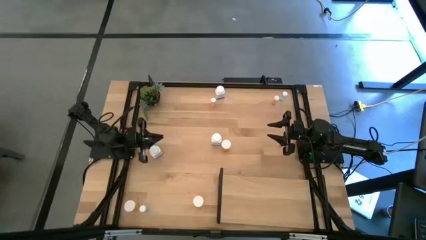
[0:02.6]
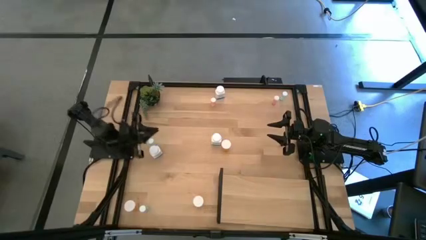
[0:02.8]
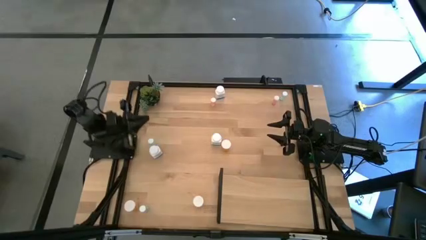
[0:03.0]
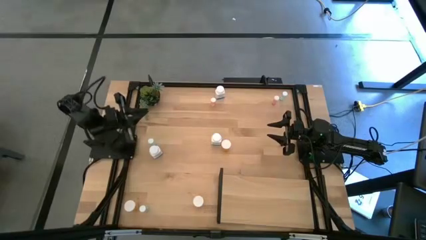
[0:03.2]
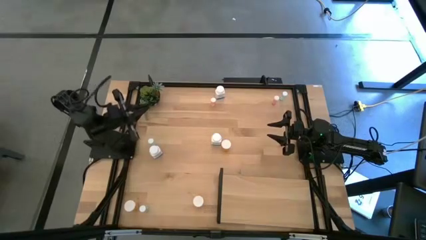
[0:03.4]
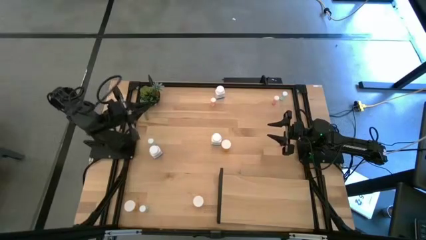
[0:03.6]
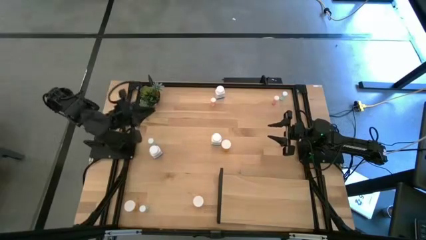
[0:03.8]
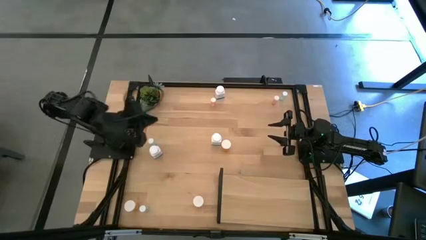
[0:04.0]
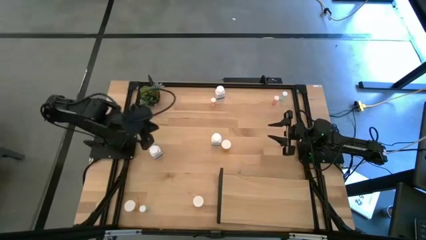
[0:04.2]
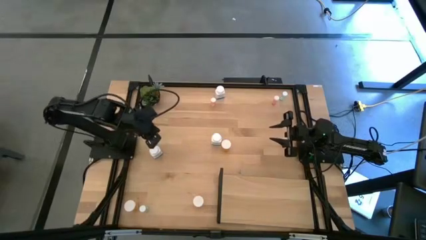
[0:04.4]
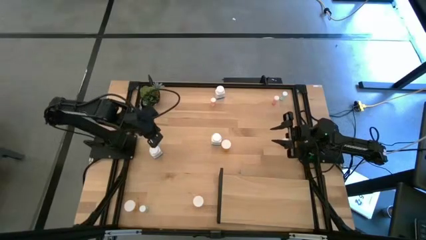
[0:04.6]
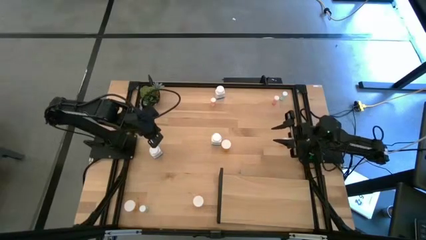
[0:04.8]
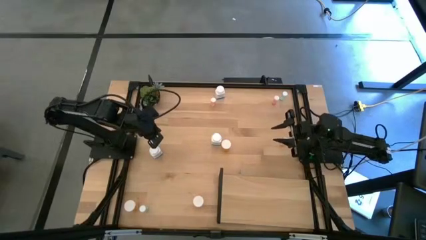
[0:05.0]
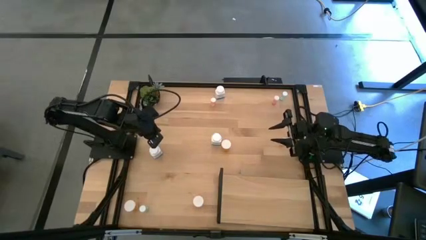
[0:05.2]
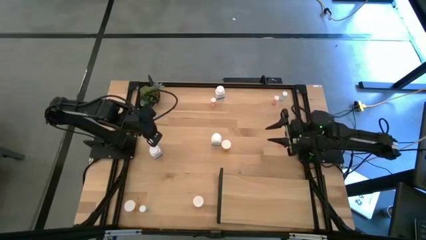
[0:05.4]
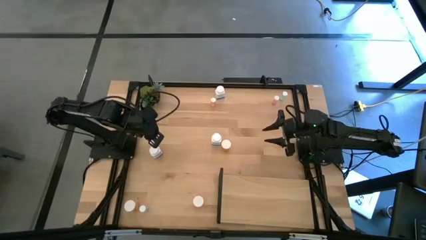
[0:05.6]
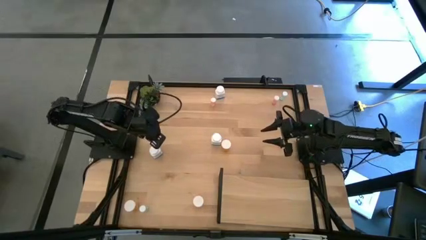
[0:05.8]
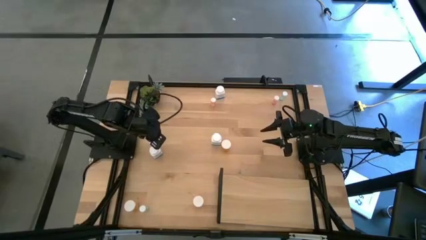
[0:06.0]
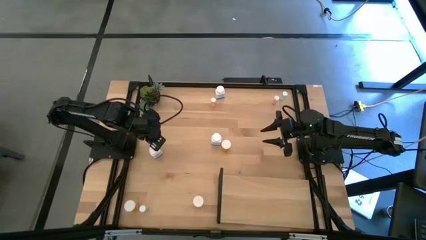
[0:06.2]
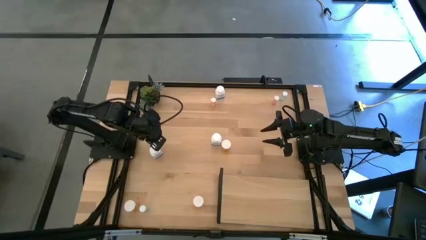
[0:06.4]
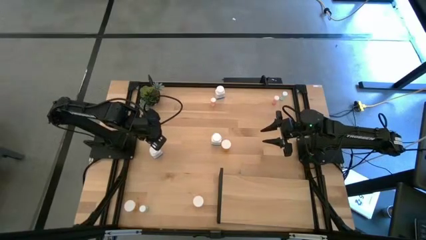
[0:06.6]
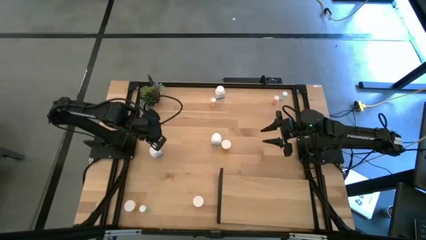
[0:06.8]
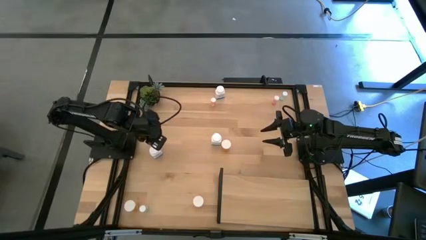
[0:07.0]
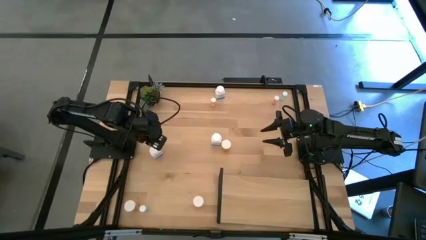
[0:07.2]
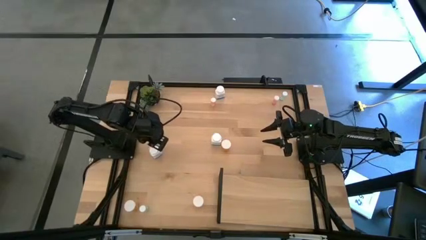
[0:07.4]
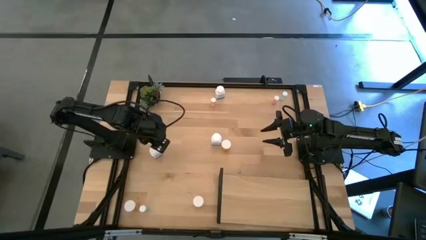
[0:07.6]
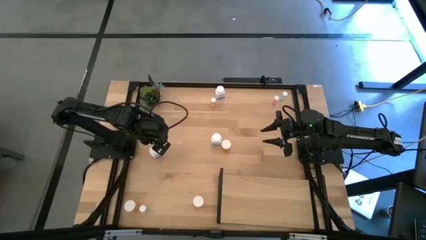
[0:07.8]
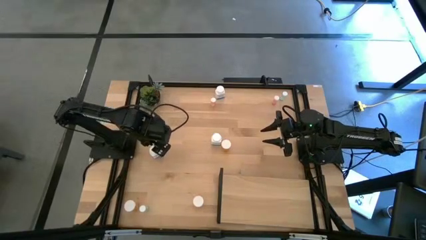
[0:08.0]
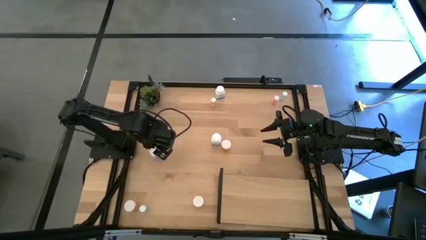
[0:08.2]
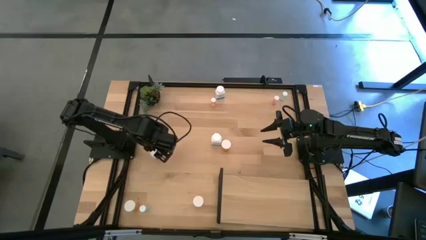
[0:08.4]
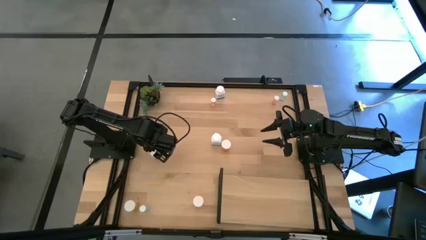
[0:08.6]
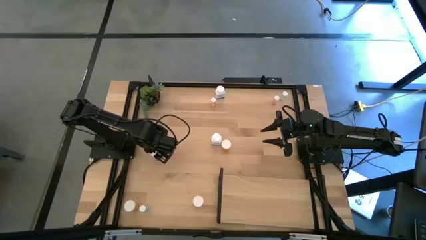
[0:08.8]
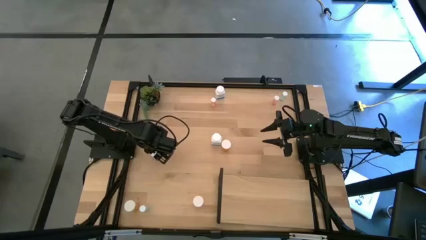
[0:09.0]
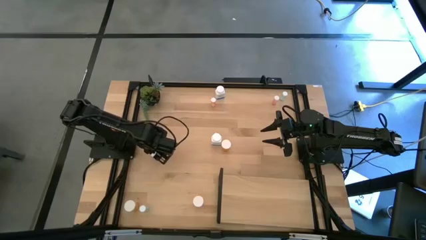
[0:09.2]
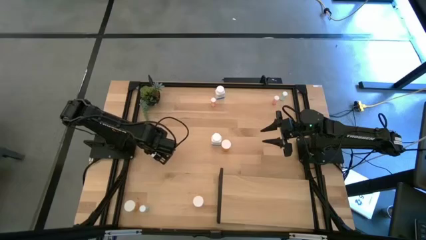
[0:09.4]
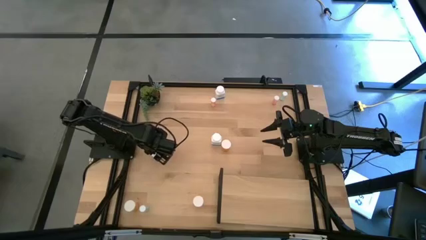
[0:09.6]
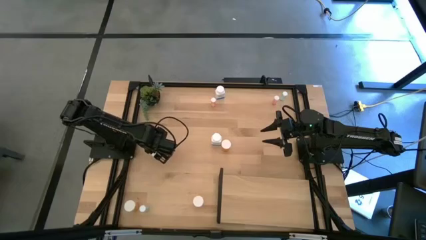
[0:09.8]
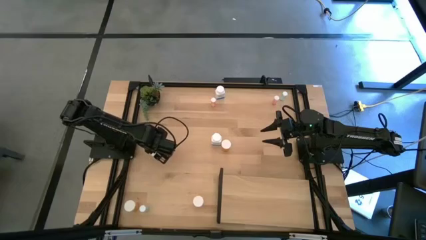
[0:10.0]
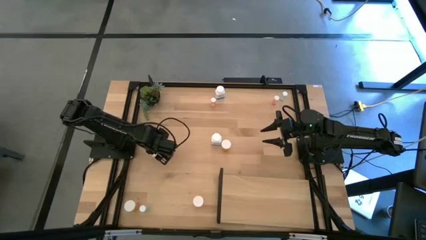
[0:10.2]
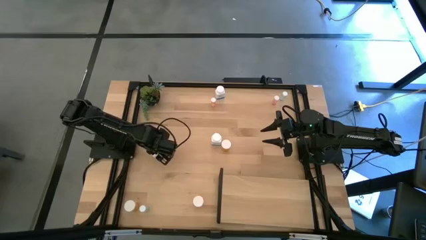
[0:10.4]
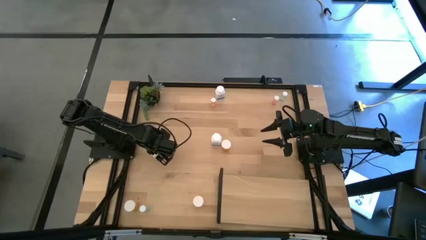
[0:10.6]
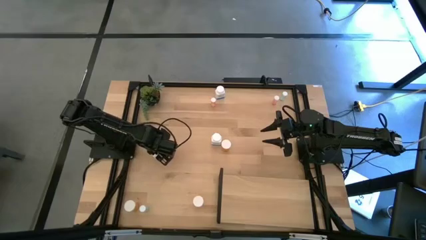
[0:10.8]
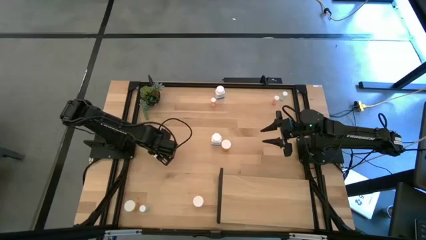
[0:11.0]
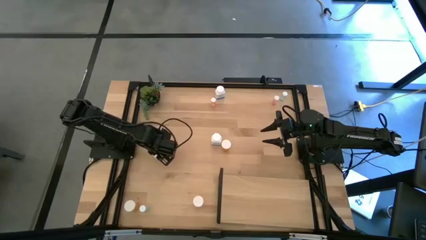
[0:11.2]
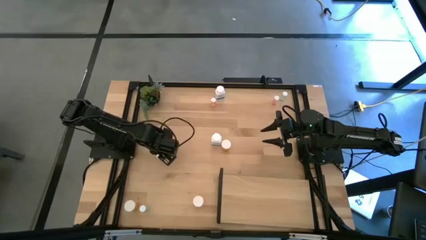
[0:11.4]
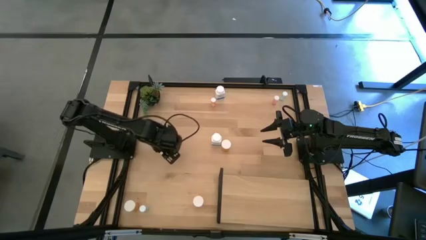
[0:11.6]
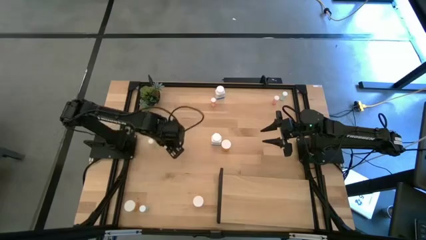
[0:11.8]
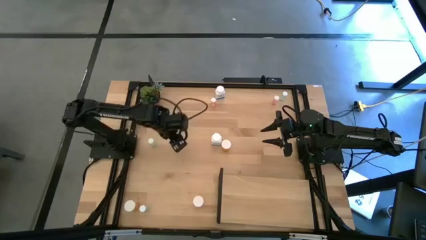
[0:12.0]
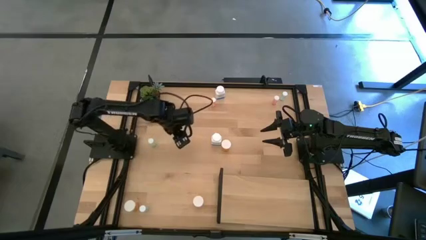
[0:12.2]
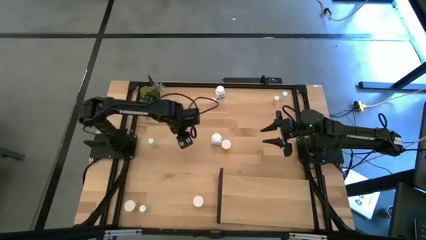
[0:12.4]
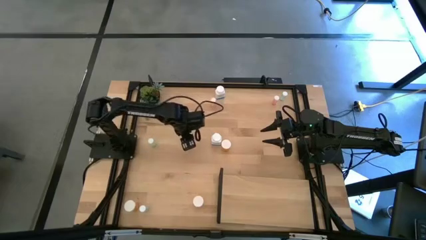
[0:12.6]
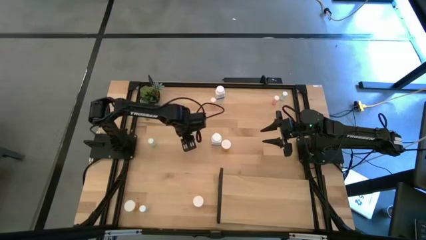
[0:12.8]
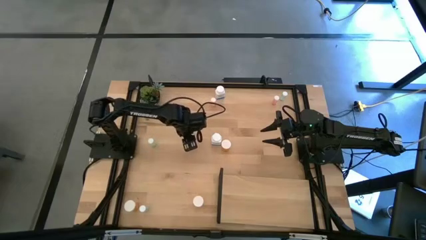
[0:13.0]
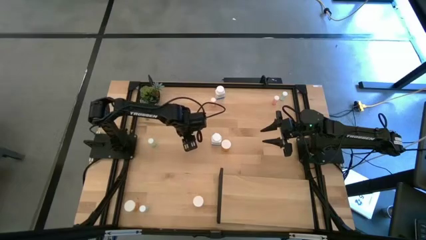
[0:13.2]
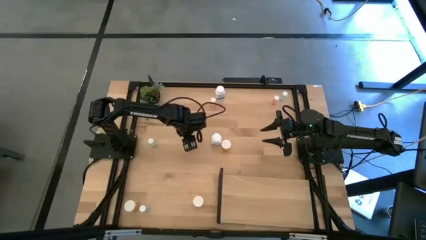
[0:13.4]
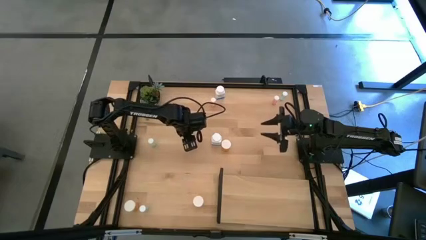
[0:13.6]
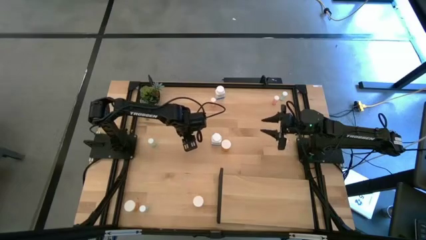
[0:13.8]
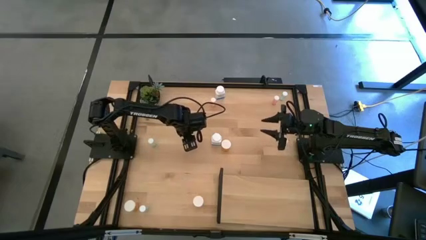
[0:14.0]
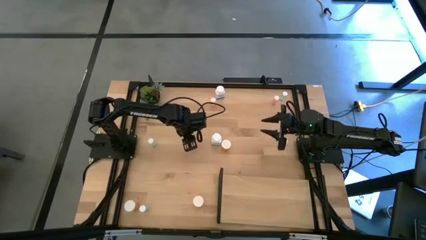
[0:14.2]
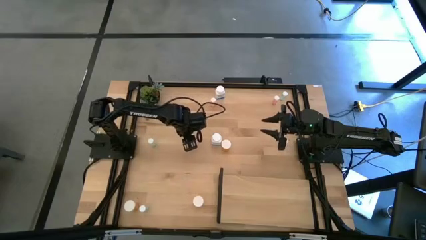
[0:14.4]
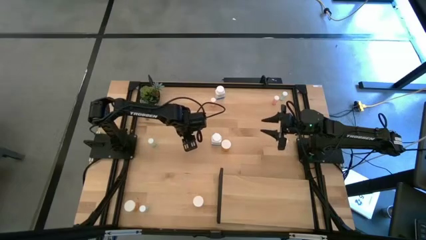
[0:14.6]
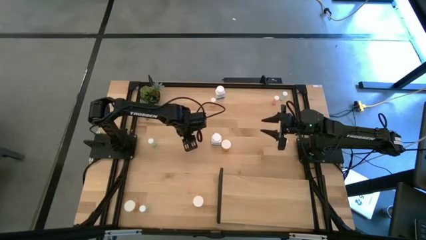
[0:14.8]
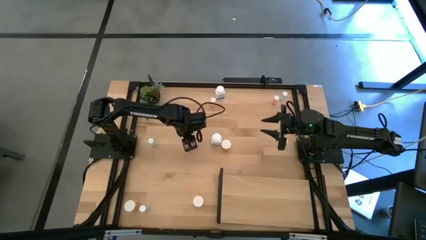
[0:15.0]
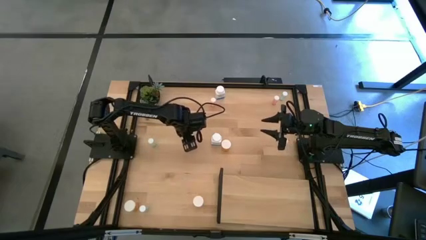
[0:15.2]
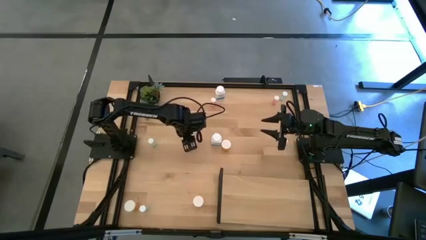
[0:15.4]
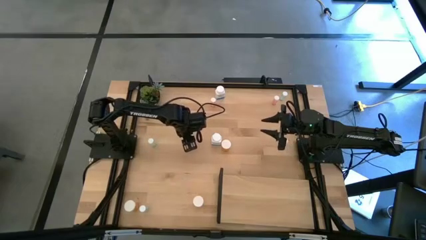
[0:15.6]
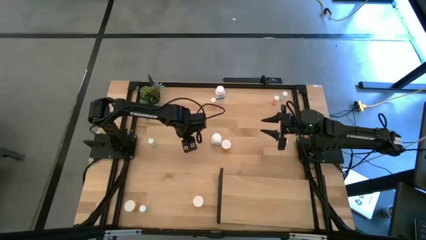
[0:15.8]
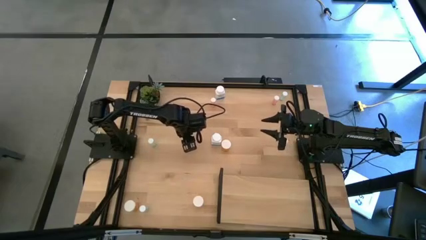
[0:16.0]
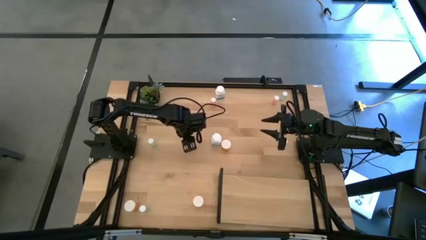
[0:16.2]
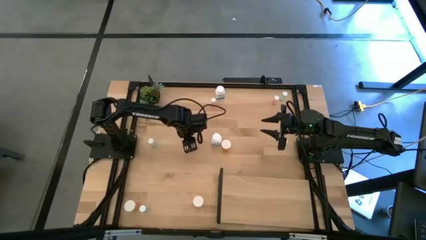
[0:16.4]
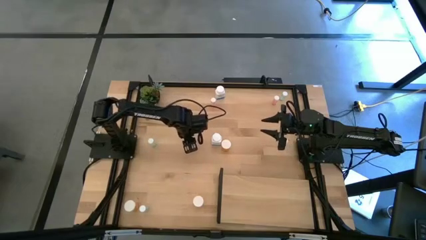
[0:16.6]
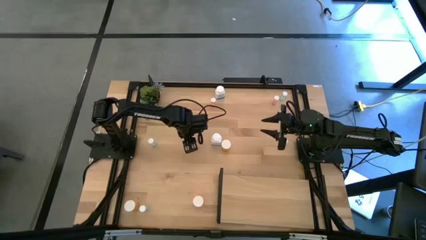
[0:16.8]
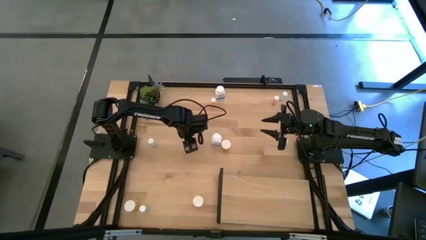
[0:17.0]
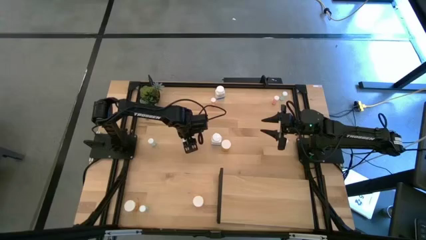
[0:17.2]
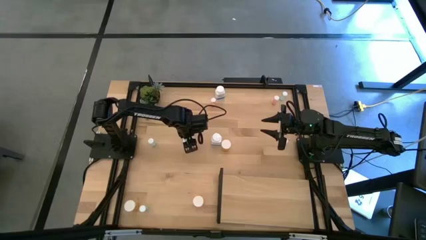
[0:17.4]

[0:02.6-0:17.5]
Task: Pick and place medicine bottles onto shelf by color
Move the bottom left white bottle closer to the center
